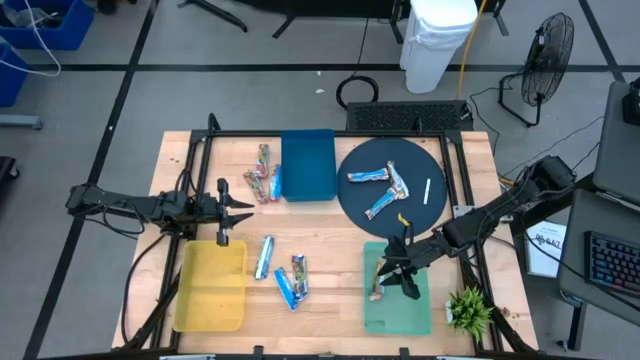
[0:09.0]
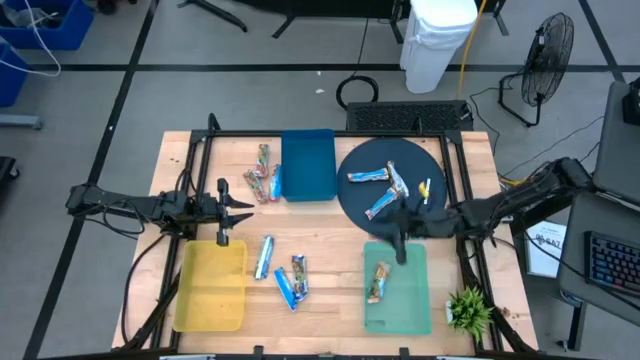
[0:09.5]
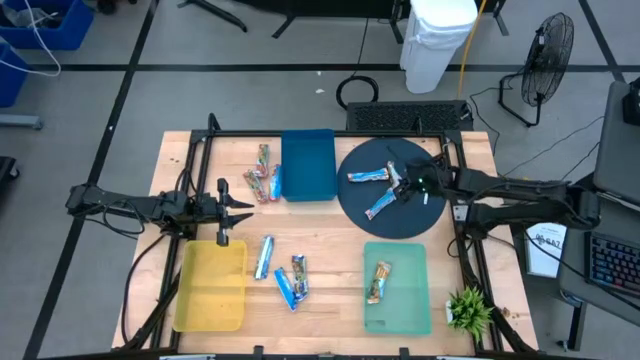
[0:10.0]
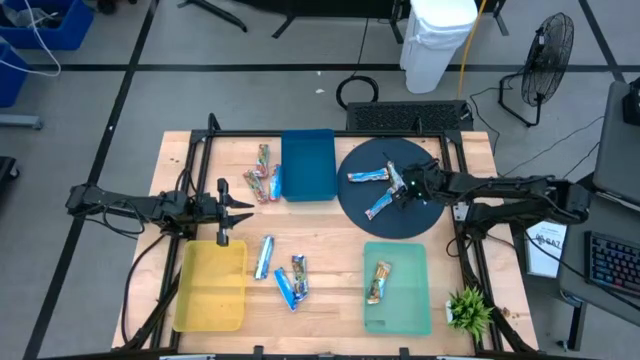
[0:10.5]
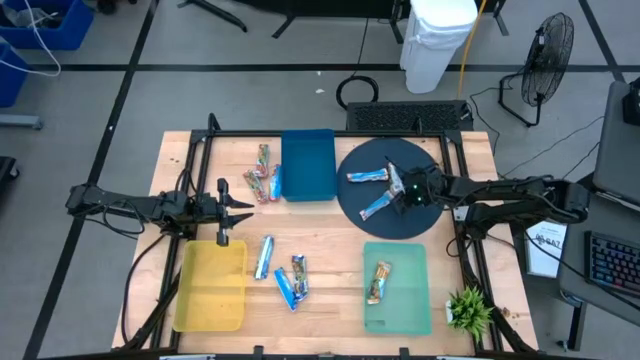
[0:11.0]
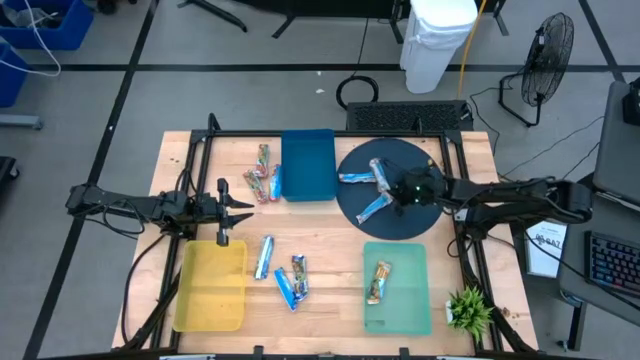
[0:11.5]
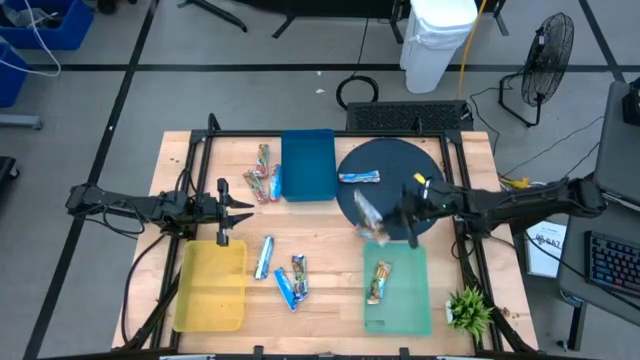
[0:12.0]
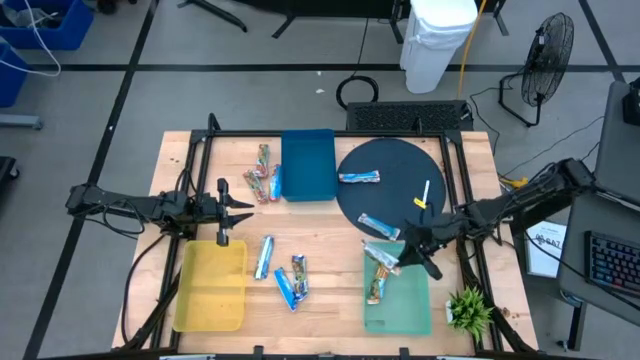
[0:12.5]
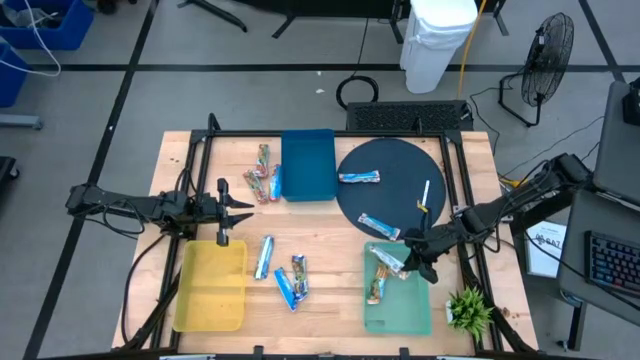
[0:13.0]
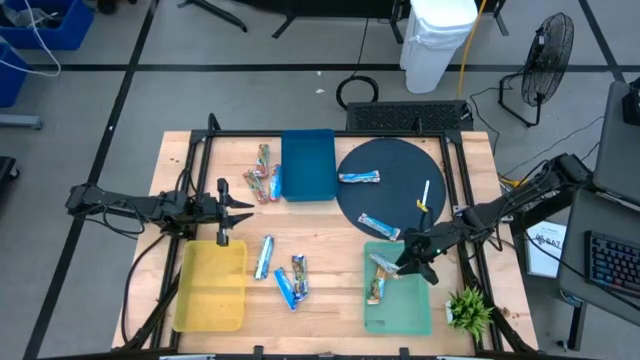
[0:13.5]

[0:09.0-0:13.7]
Task: Pick and place Granola Bars by type
Put the yellow granola bar into the green bin

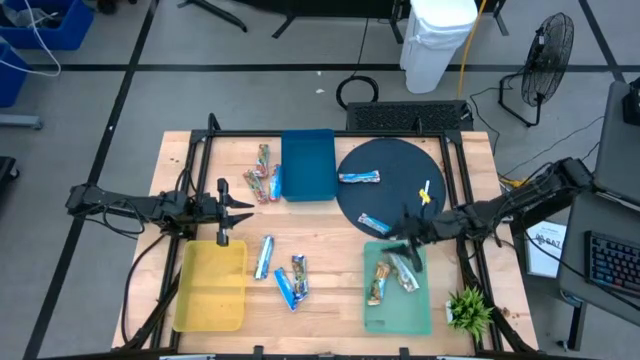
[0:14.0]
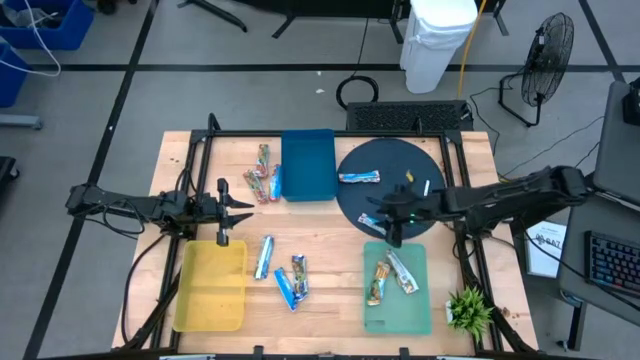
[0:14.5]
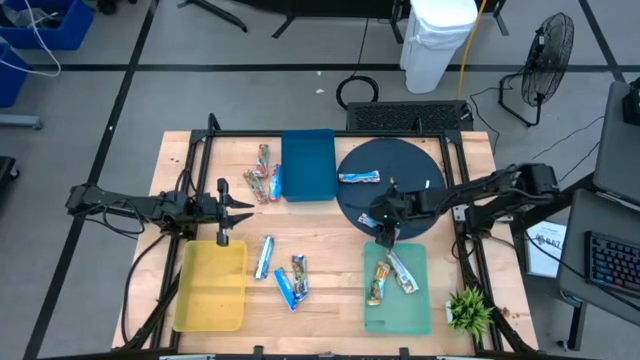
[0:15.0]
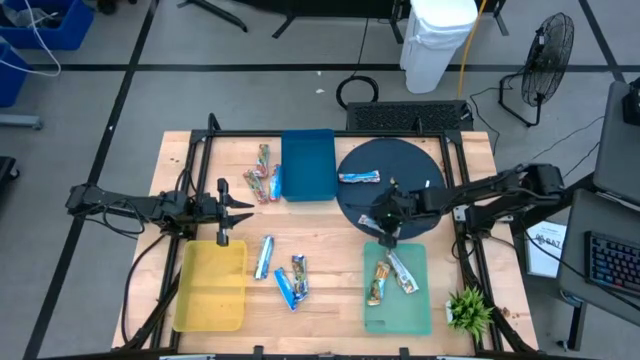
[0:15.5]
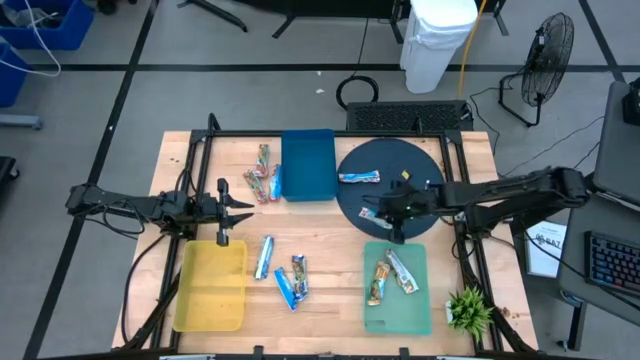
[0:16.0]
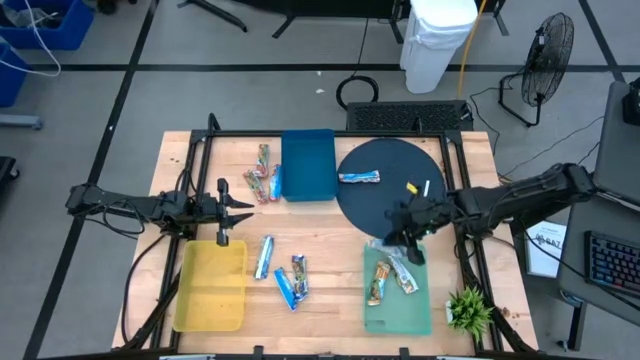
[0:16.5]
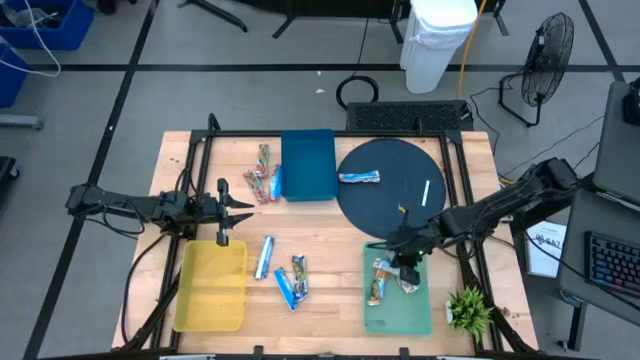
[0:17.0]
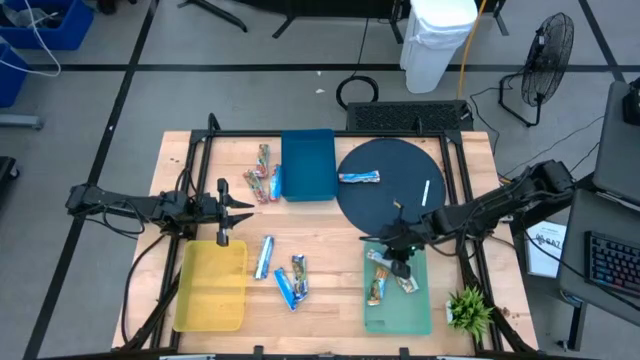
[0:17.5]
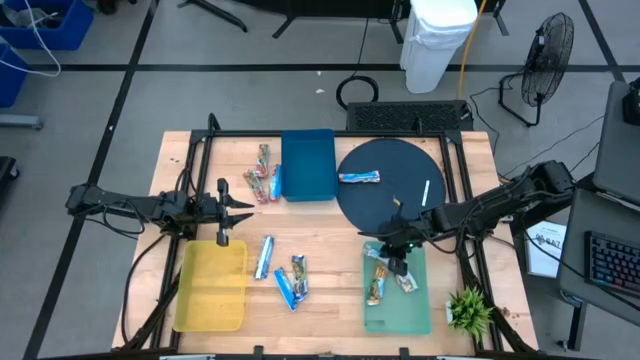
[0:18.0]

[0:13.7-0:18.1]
Put the yellow granola bar into the green bin

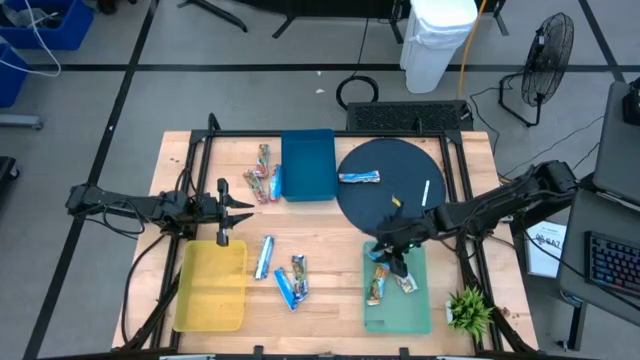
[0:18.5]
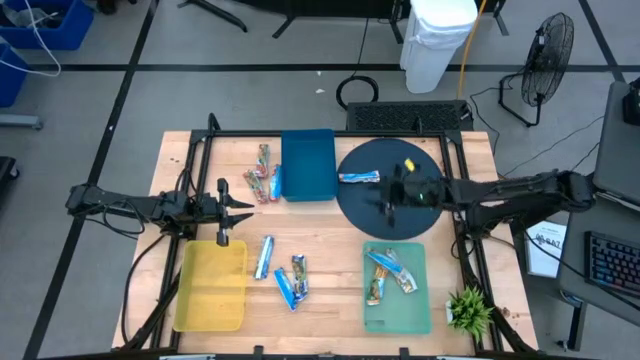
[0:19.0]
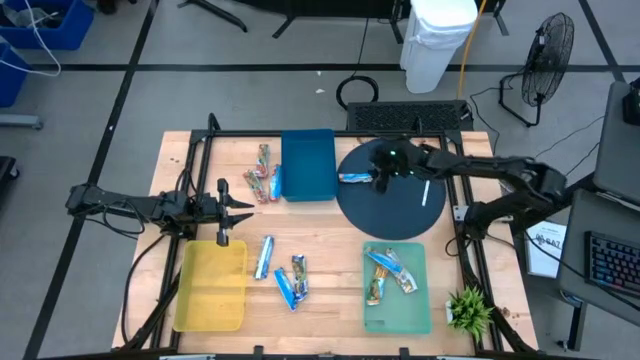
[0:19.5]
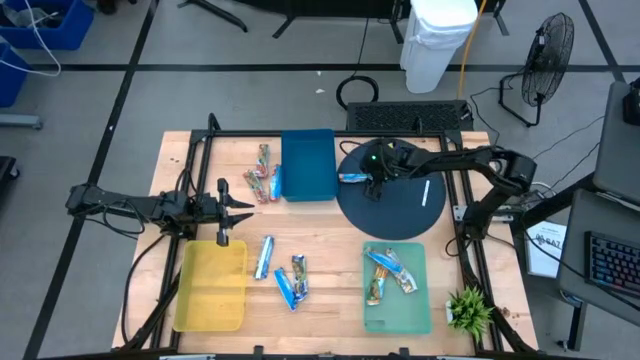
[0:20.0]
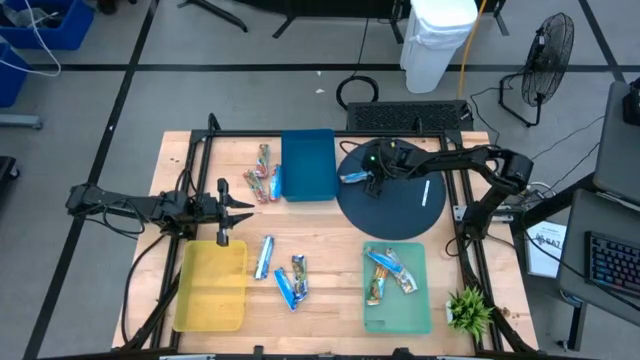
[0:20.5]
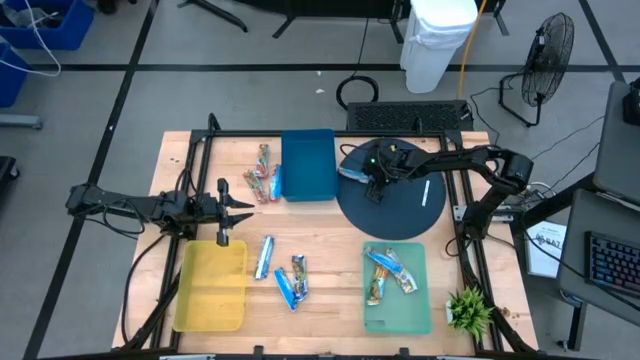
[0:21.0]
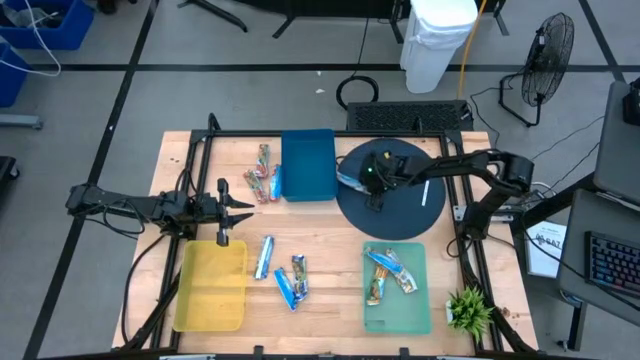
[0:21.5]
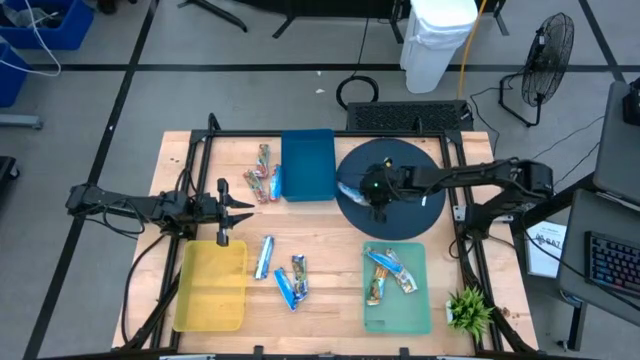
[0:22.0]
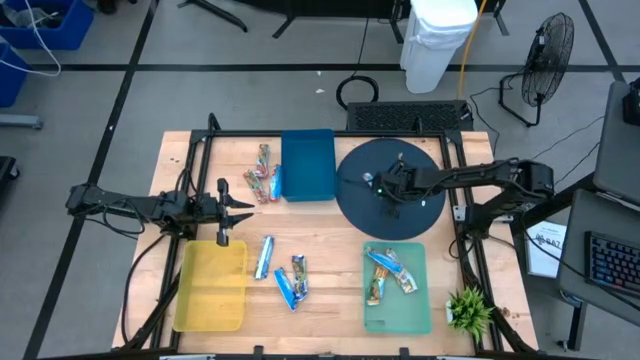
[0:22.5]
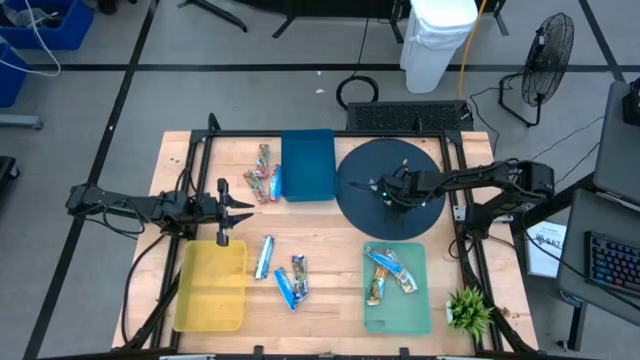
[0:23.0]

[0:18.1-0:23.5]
Put the yellow granola bar into the green bin

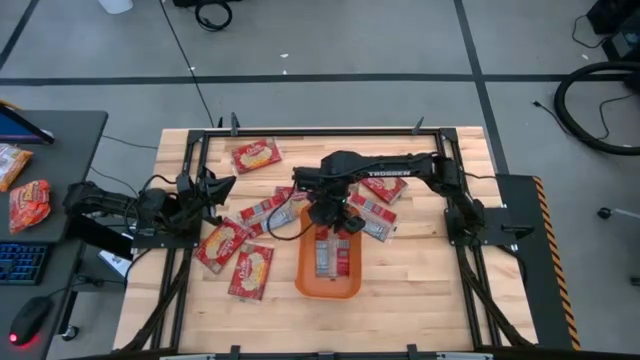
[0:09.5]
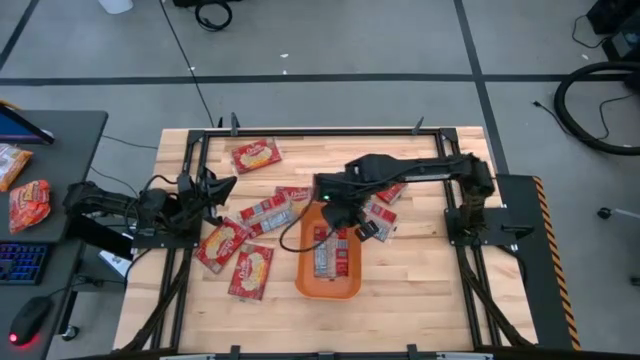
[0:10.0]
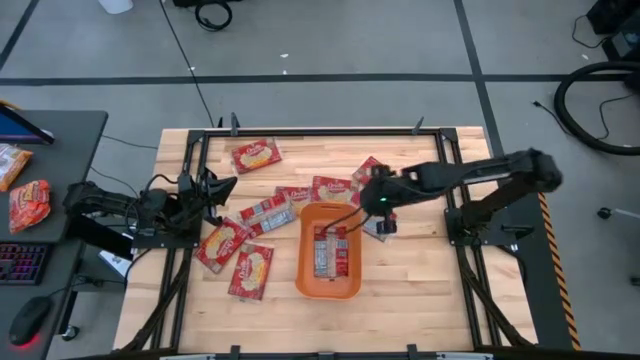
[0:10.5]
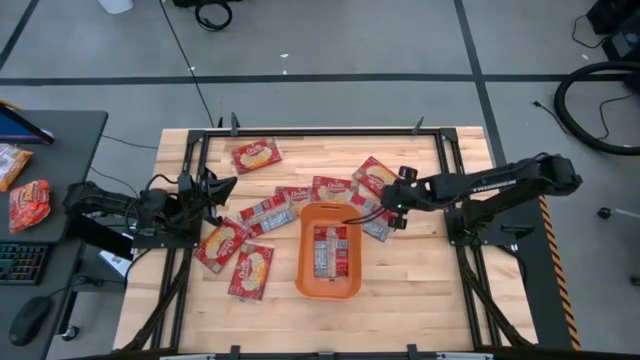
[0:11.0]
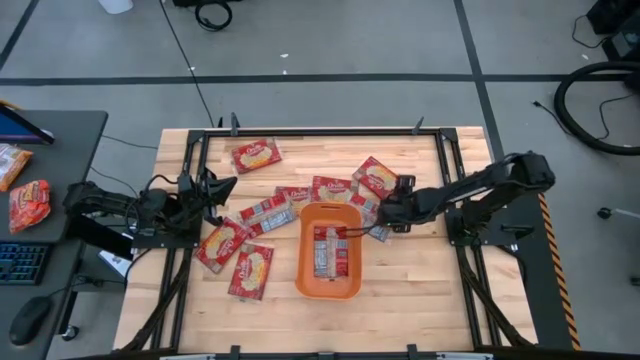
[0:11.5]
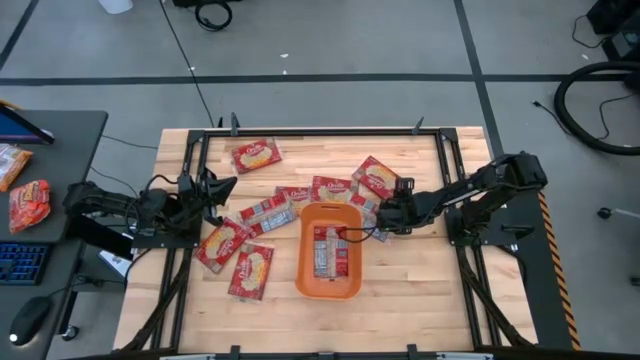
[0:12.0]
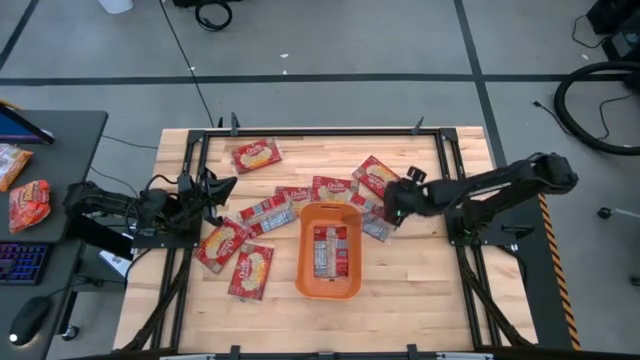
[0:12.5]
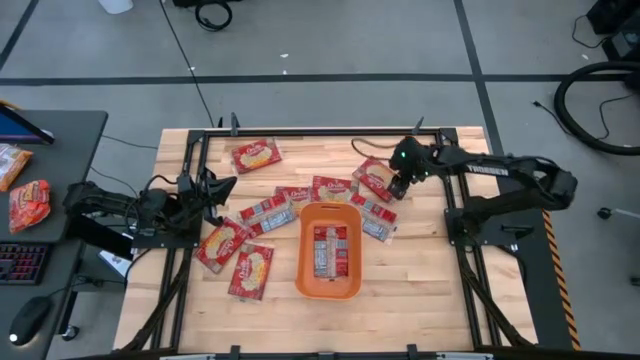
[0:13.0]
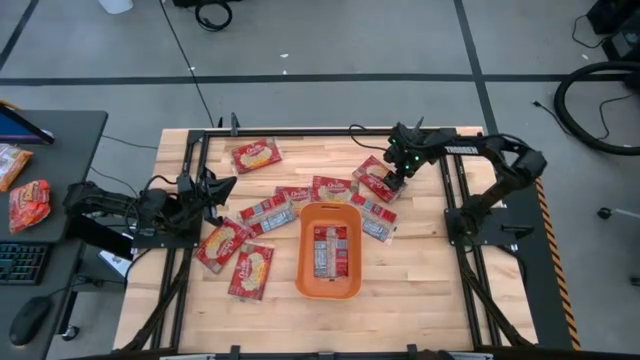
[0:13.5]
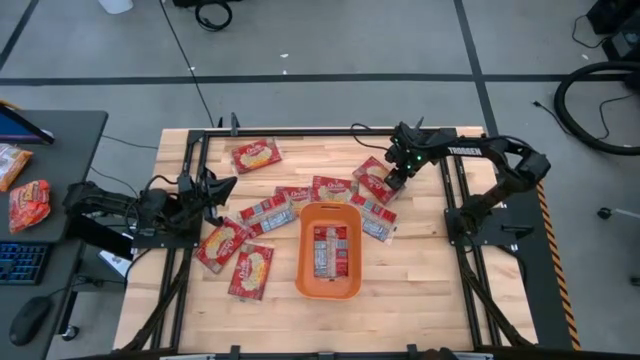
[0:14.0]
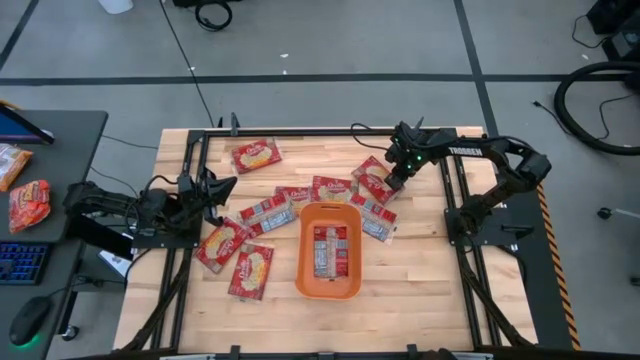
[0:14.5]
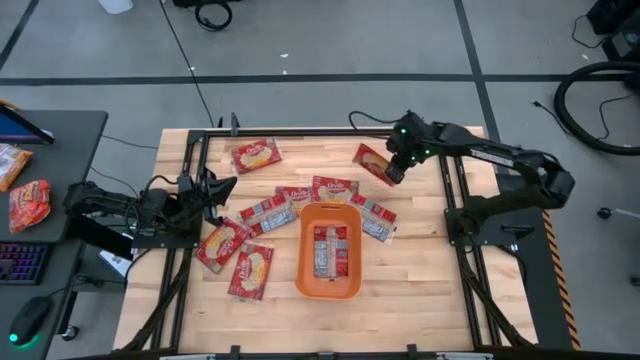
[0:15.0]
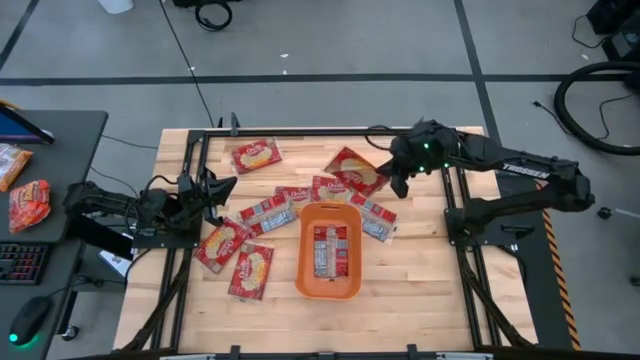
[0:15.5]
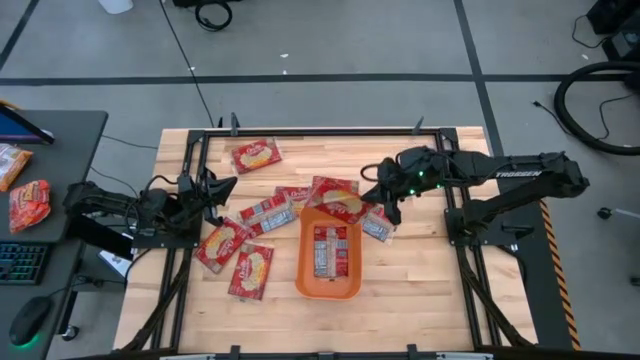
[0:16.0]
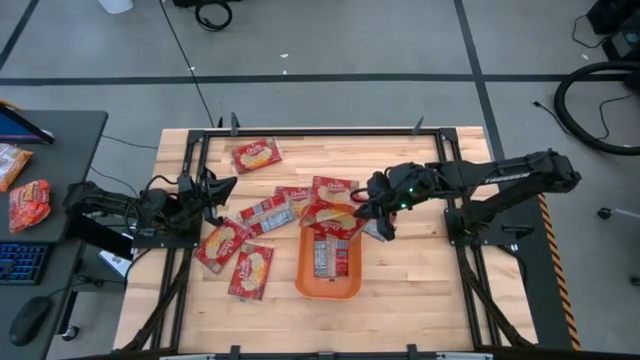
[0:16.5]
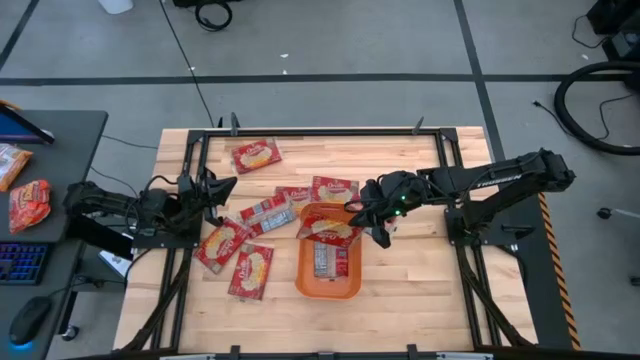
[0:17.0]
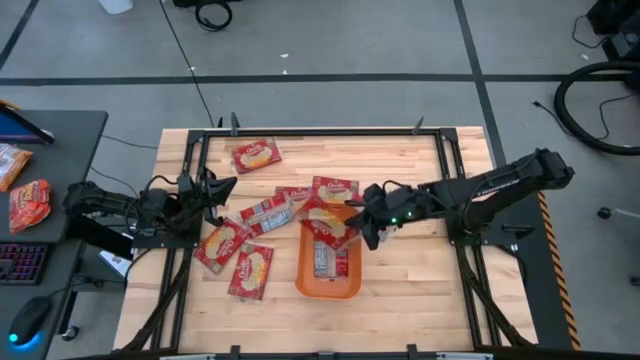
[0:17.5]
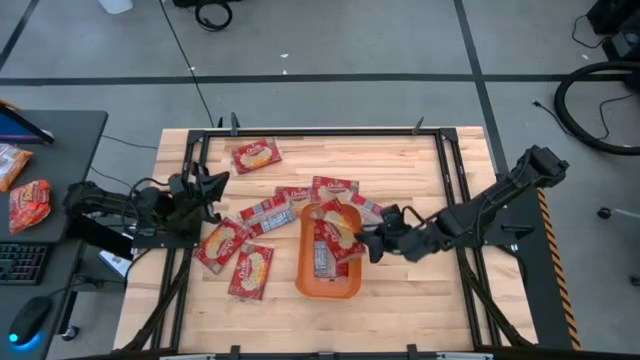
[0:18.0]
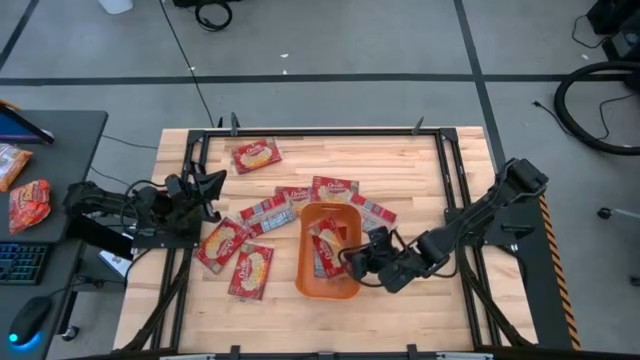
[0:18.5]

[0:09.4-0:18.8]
Task: Sort popcorn bags into baskets
Put the red popcorn bag into the orange bin
